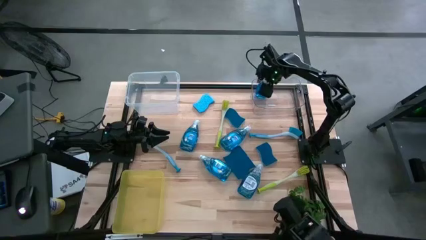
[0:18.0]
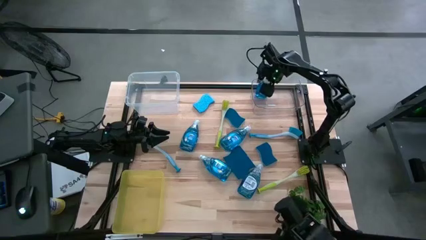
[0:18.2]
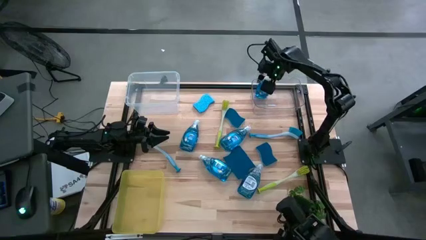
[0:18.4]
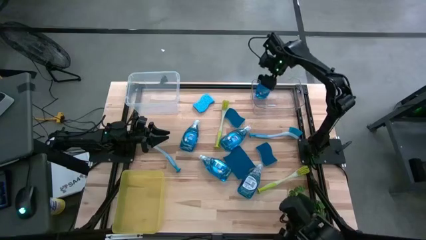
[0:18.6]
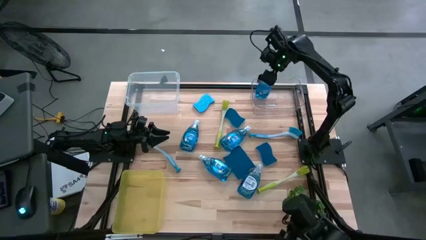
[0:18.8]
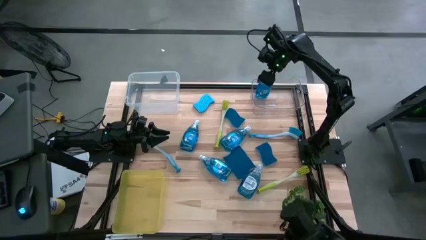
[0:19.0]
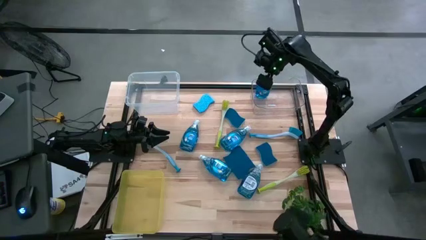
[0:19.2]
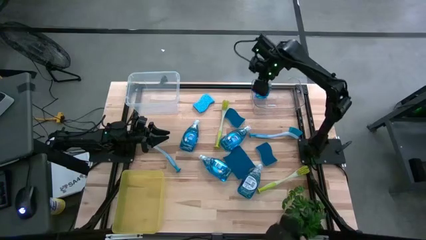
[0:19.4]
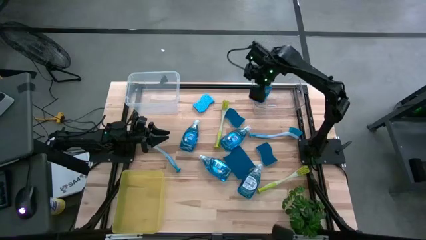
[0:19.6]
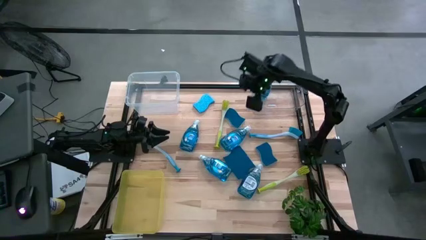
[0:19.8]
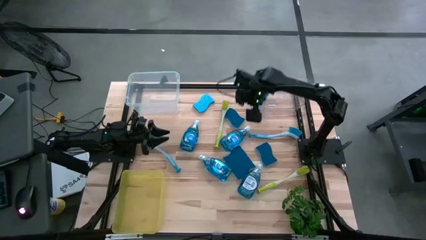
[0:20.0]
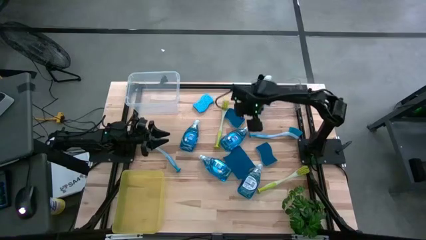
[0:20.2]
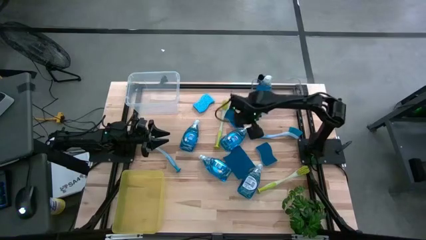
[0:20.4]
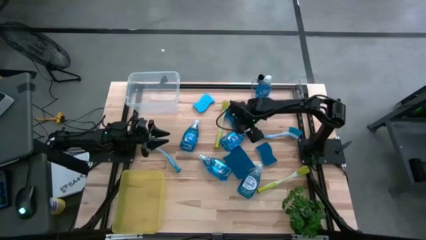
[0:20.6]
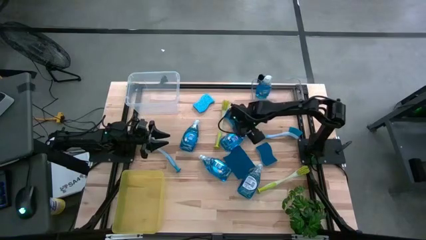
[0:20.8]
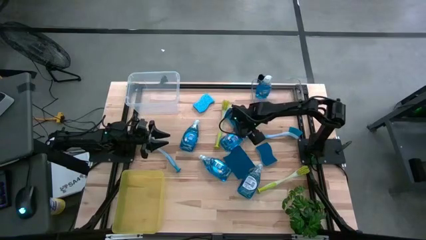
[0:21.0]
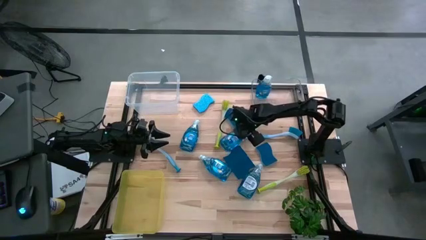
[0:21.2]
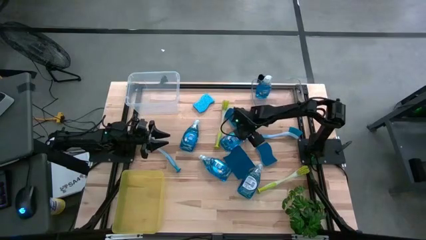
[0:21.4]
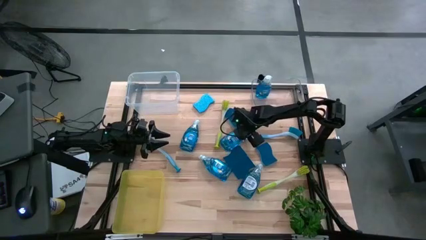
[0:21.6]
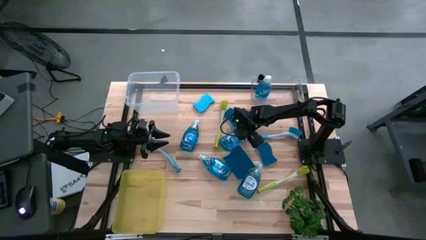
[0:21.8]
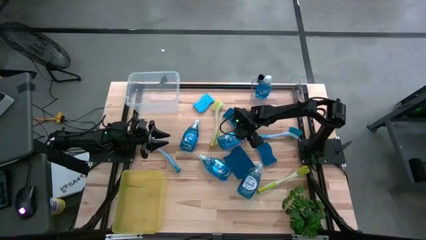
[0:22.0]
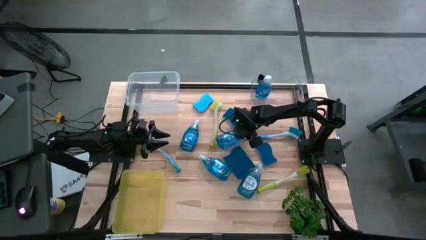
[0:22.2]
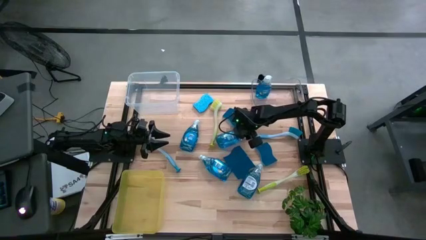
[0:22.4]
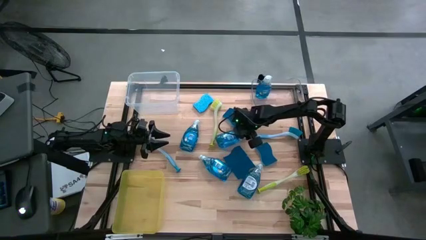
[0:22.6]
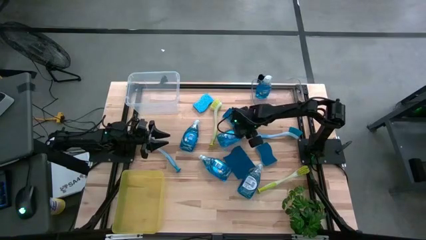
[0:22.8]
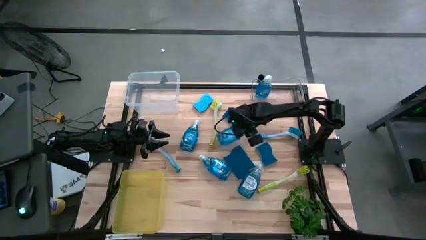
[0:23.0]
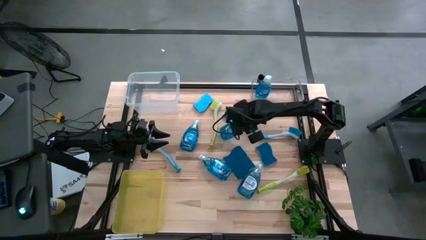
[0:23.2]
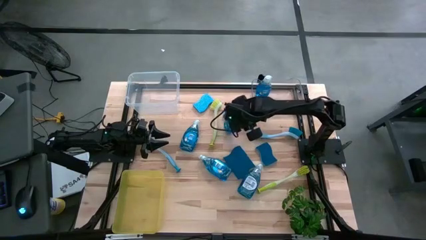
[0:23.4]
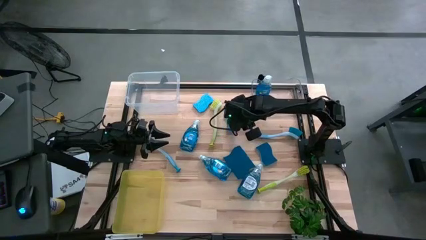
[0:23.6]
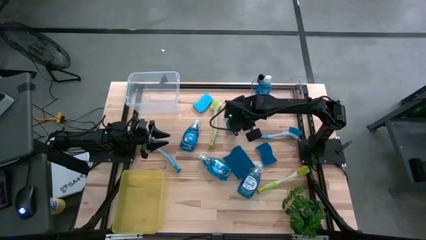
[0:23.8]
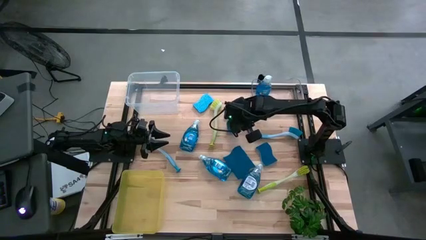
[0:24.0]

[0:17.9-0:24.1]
Task: Pick & Place Kitchen Sink Supplies
Put the top right soap dispenser into the transparent bin

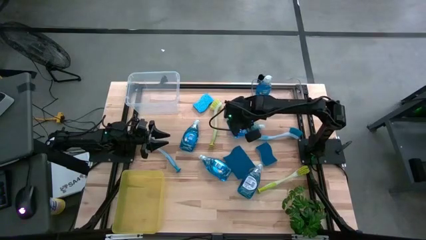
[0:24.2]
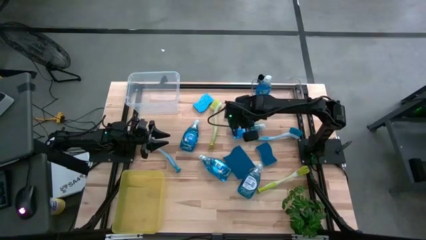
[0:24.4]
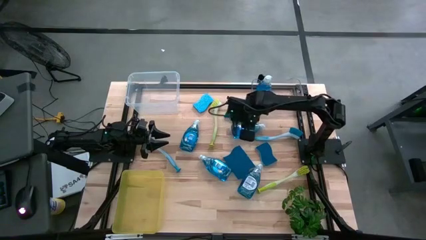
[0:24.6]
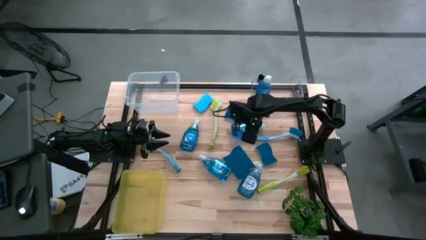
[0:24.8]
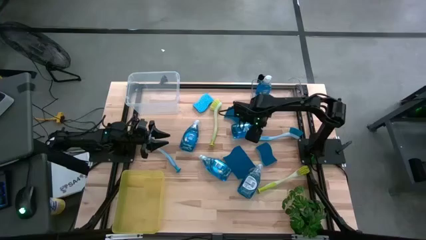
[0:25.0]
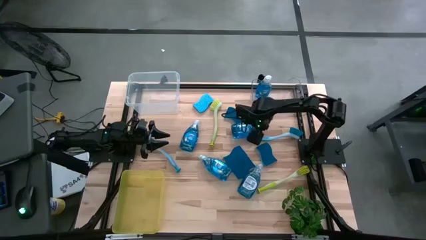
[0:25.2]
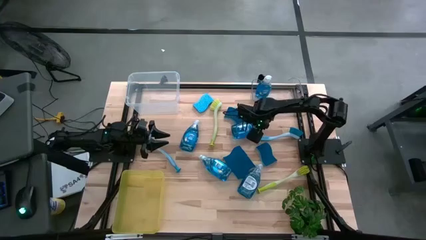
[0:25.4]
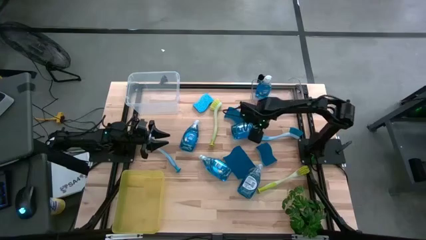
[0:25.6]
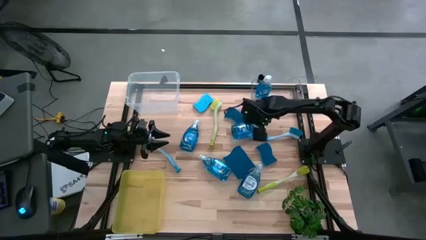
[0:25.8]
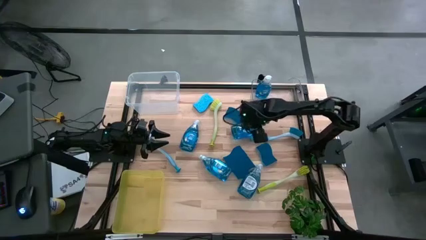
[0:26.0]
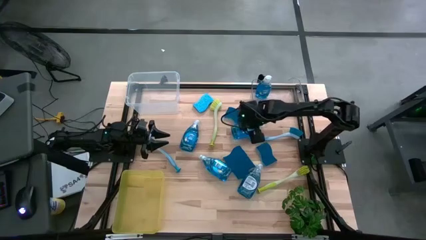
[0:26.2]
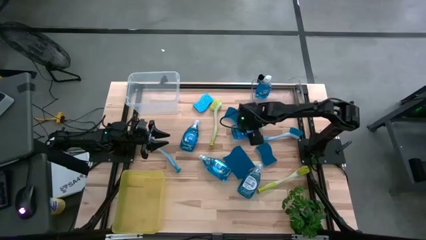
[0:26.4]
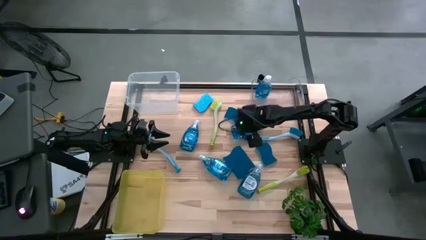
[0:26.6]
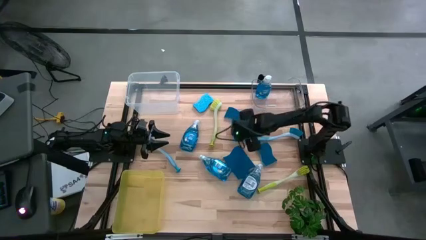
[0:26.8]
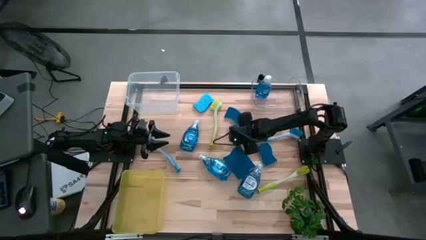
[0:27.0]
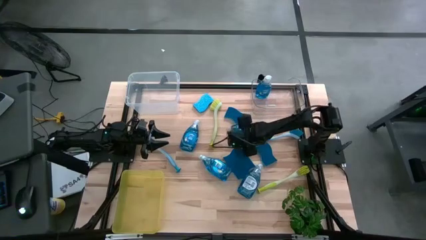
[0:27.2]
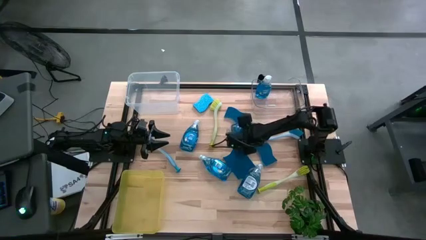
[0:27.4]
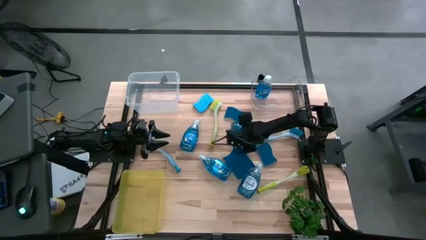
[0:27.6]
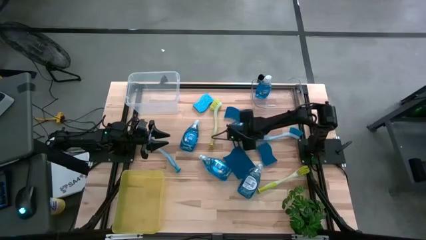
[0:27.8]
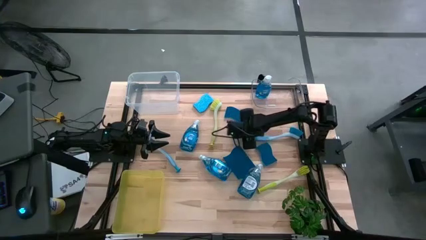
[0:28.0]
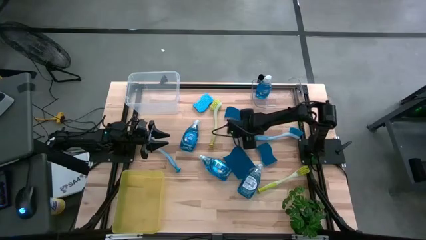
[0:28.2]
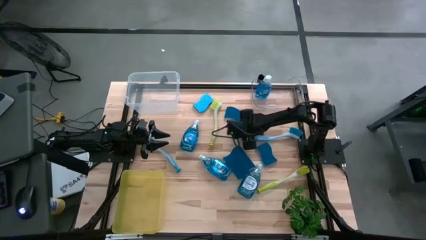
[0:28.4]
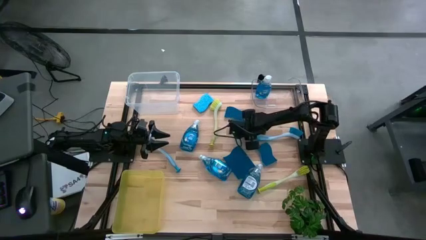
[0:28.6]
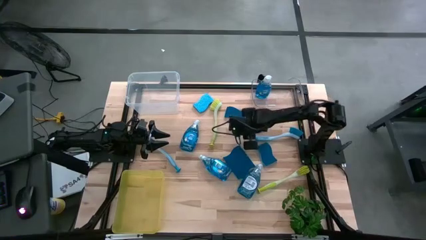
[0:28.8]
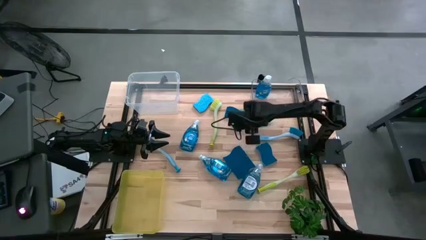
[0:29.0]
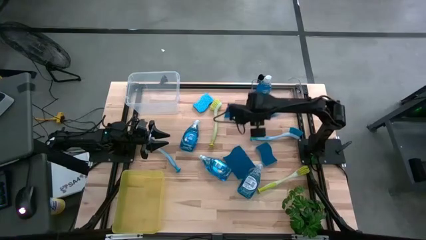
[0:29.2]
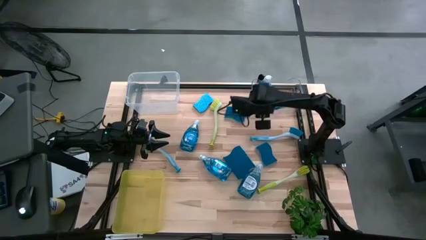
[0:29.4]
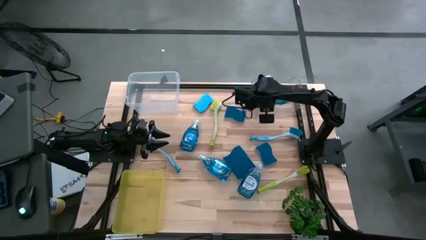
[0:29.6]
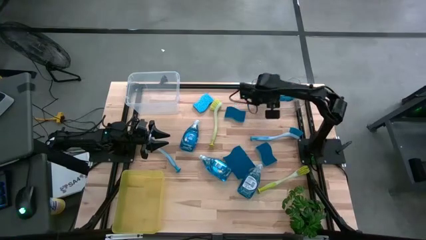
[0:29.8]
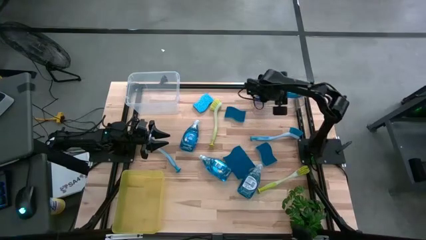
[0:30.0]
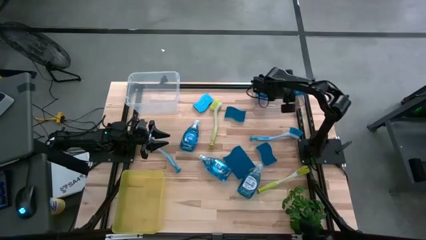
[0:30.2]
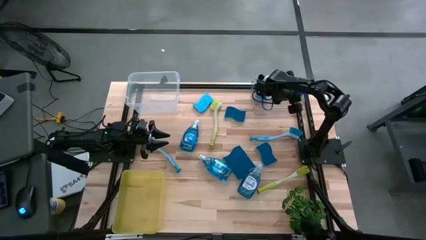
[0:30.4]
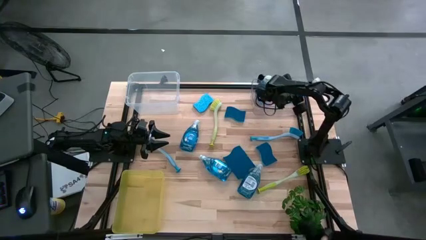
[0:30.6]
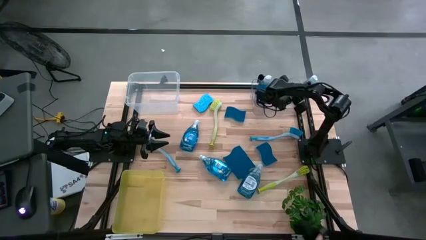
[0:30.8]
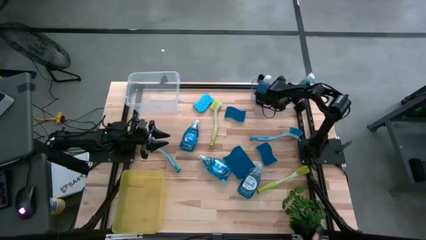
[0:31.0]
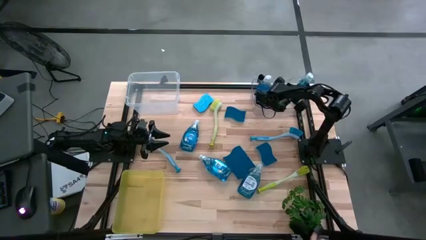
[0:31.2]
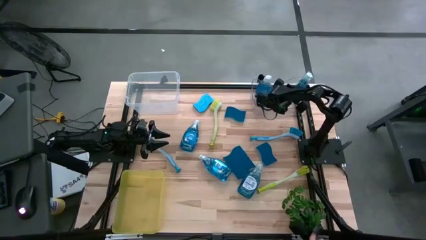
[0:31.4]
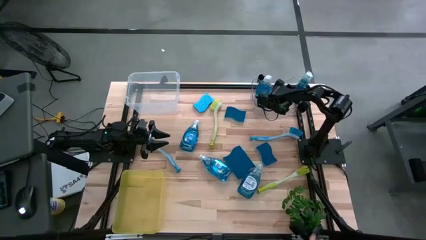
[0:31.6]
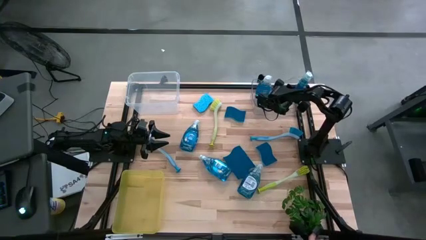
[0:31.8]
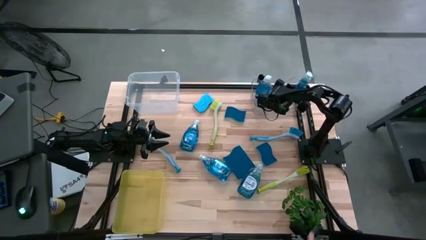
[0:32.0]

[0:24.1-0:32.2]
Put the top right soap dispenser into the transparent bin

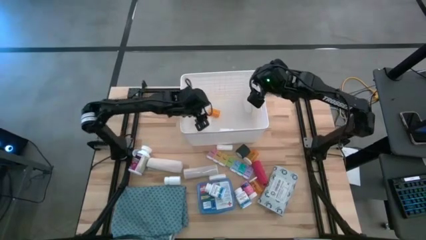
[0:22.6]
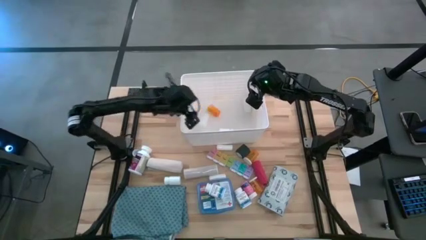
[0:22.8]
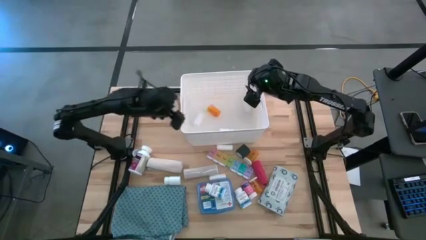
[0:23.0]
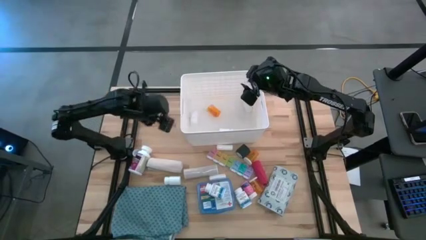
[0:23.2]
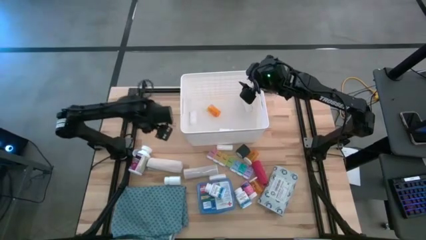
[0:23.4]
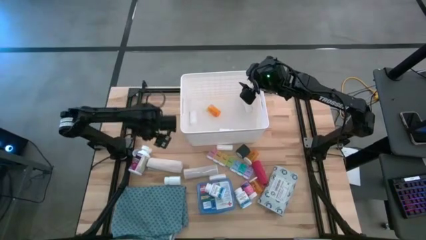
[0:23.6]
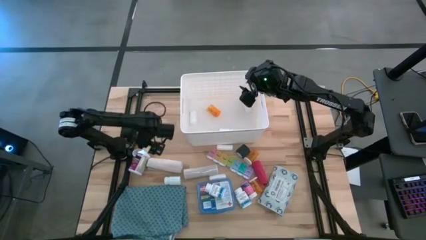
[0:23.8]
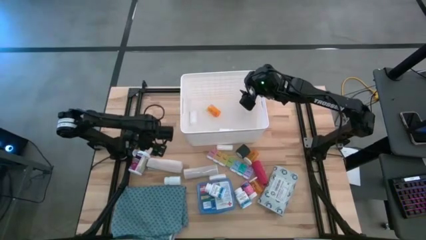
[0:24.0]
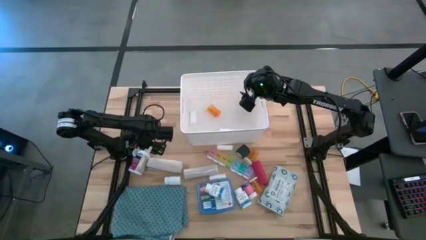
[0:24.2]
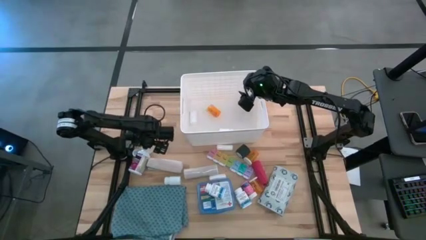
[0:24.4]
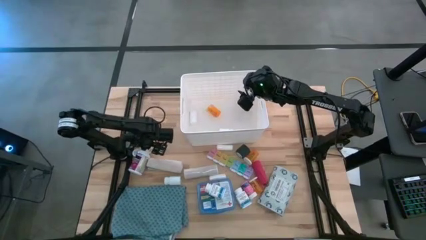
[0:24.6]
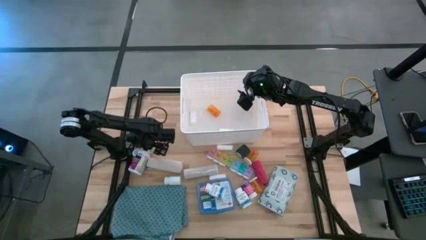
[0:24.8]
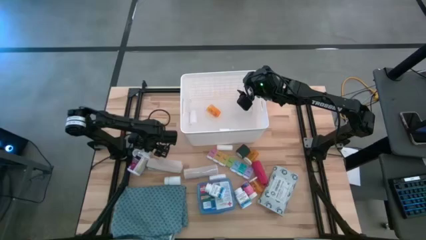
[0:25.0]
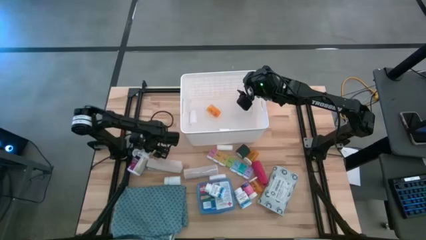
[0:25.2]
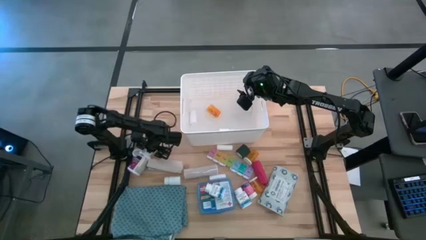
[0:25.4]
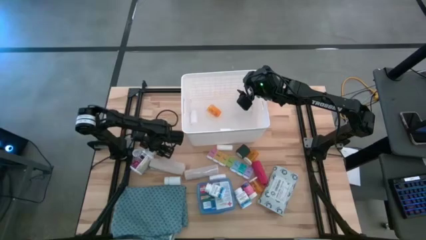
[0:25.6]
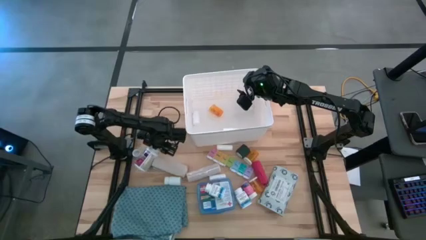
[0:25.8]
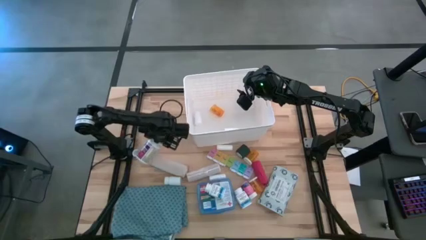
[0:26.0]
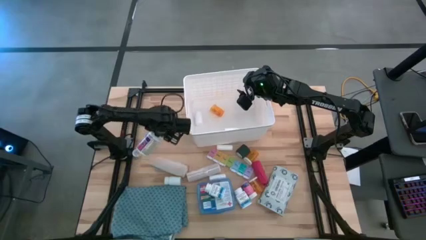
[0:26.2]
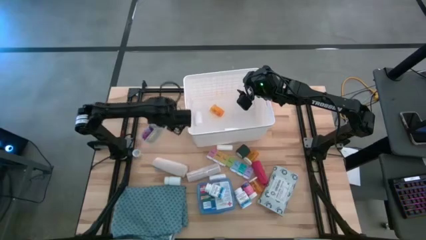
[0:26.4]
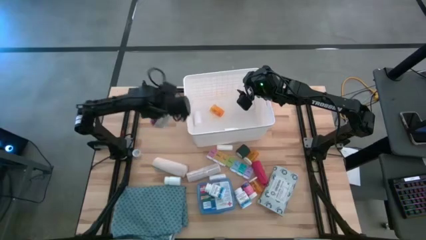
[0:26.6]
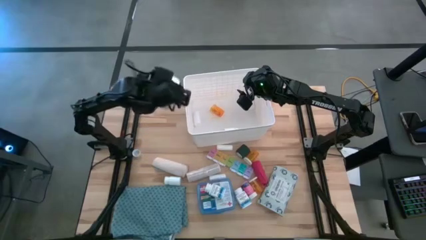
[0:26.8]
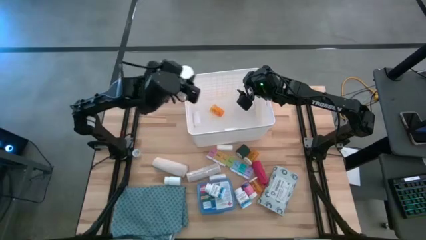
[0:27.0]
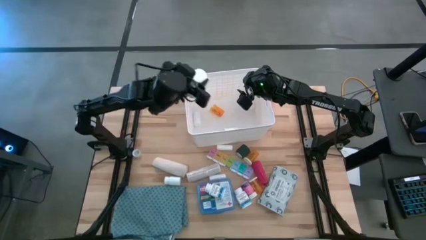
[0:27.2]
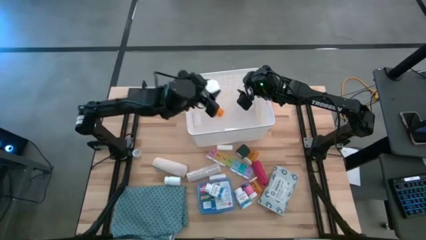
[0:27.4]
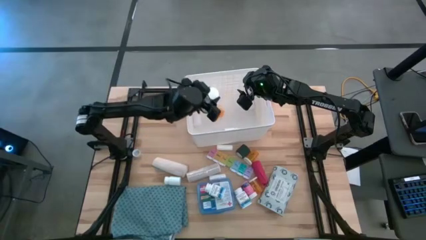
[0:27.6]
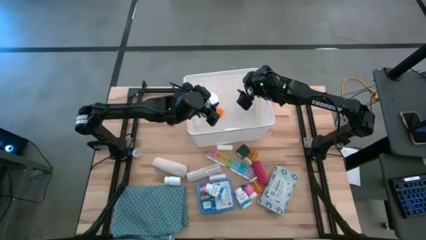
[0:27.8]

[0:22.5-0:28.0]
Task: Pick & place medical supplies in basket/bin
Put the purple medicine bottle into the bin
